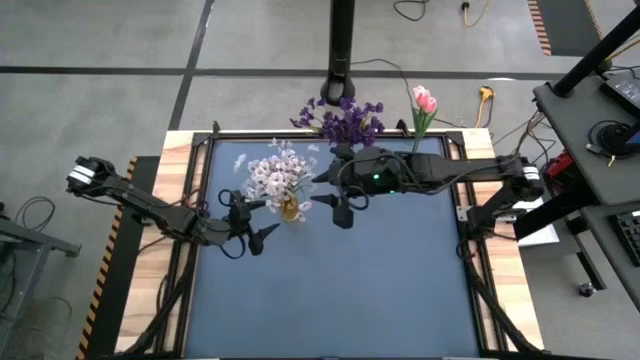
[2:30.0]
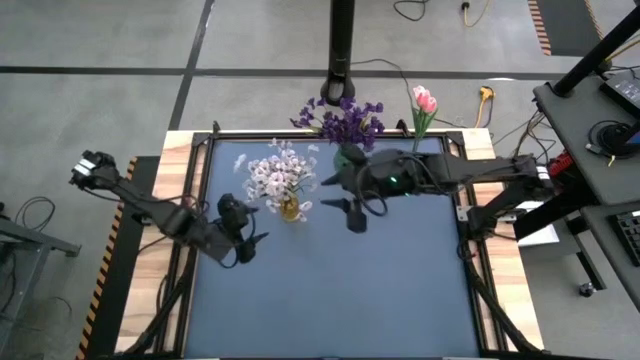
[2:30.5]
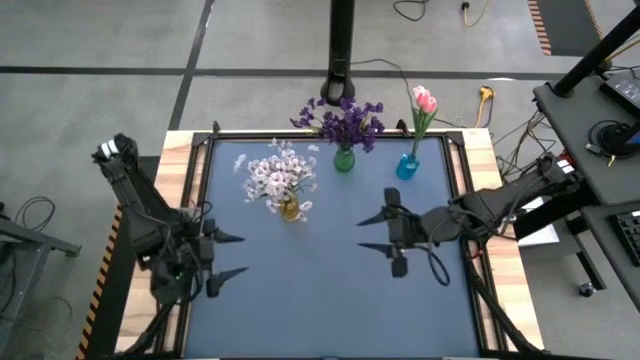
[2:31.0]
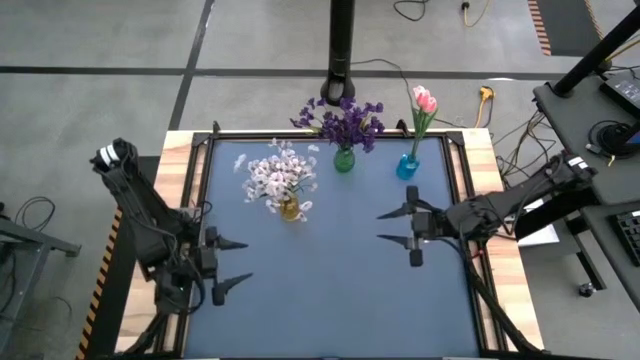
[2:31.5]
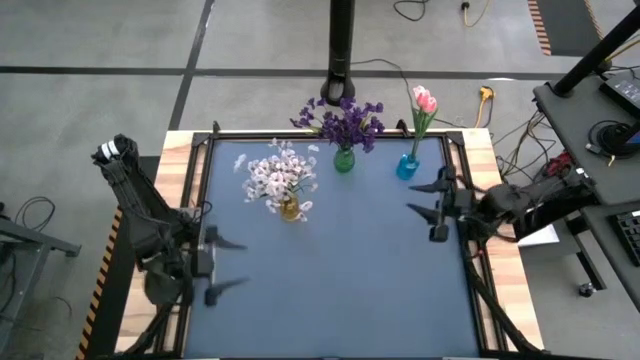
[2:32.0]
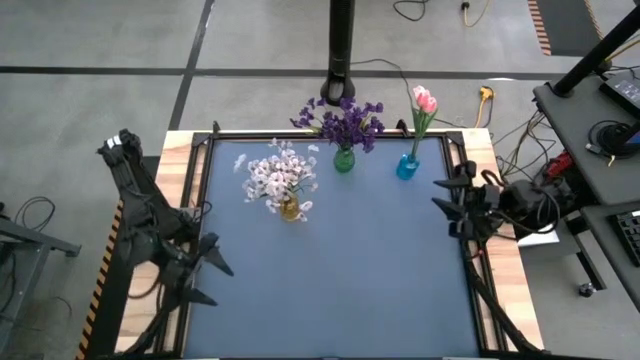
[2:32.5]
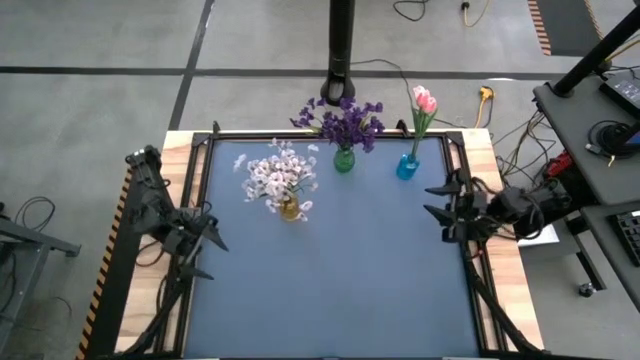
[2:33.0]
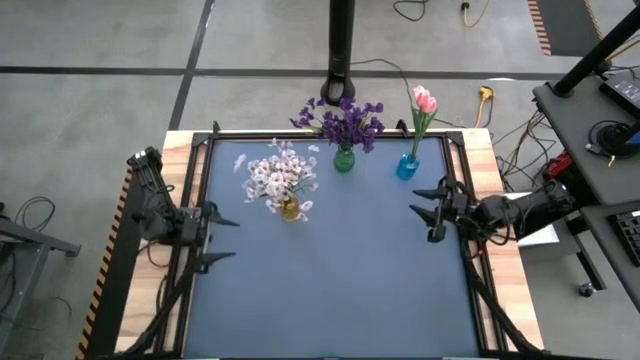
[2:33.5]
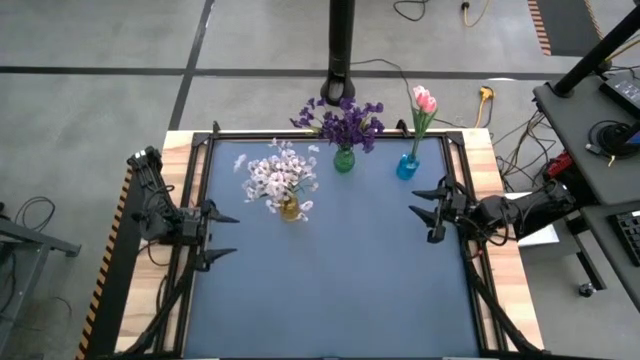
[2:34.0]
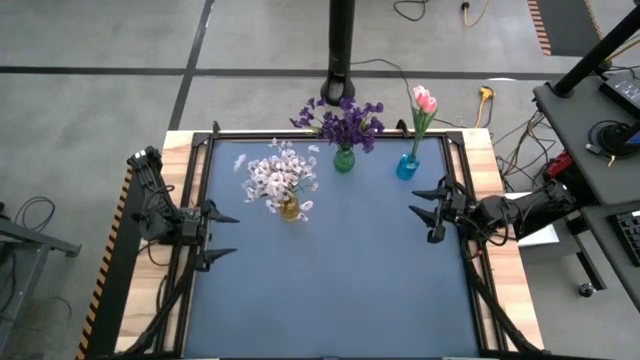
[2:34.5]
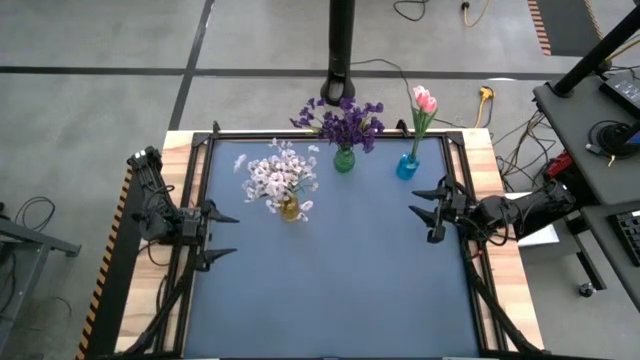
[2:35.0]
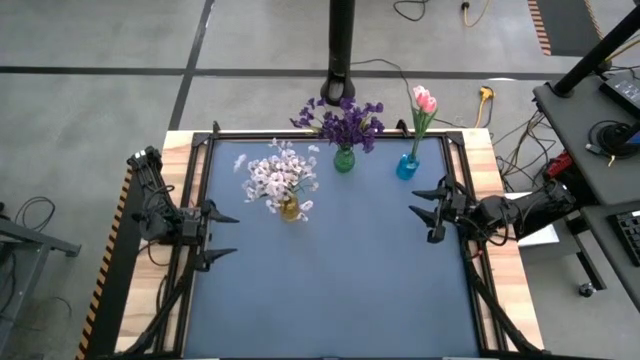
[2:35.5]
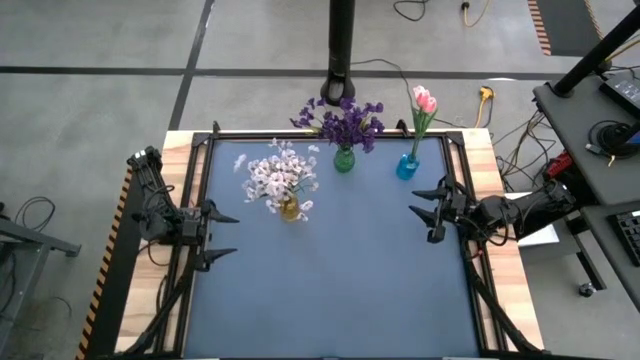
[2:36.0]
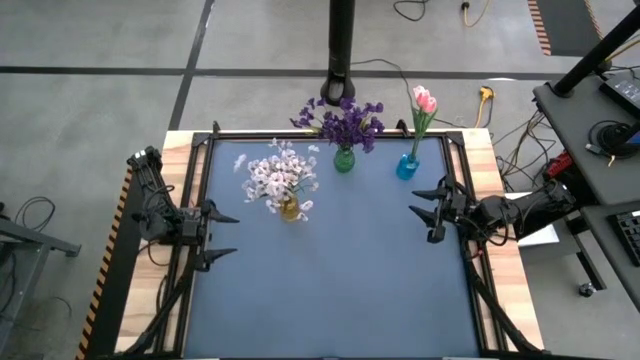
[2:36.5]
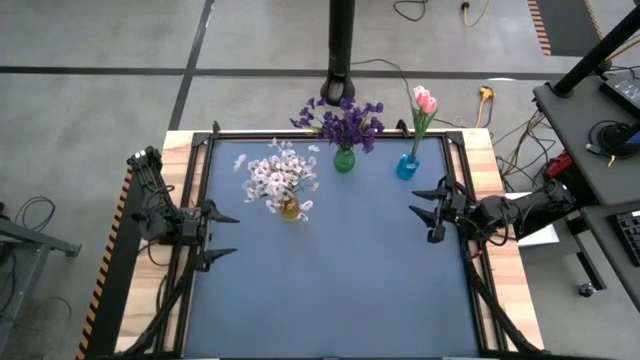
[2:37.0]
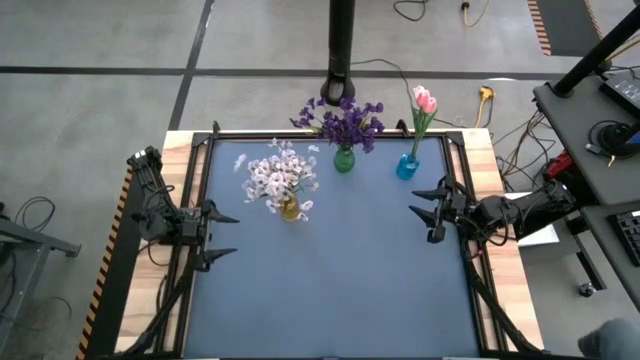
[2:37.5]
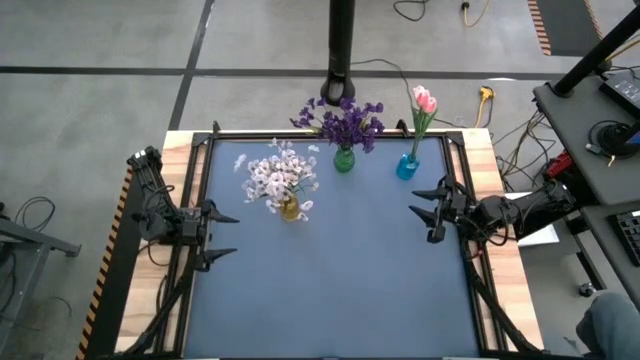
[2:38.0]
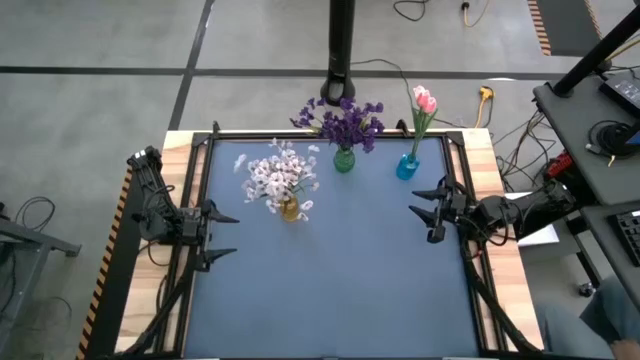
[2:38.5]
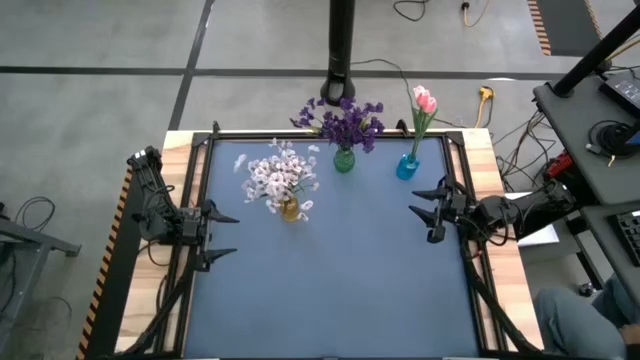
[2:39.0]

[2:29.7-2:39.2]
Task: Sort flowers into vase by color
Return to Home Position

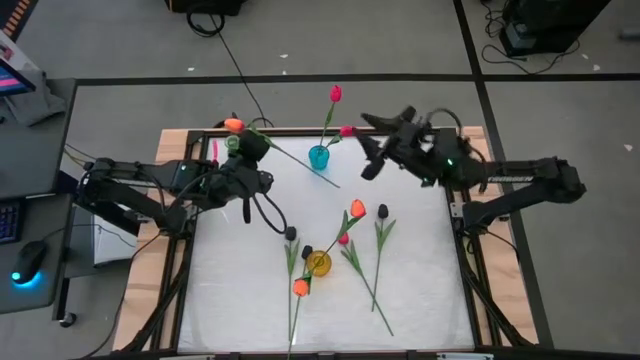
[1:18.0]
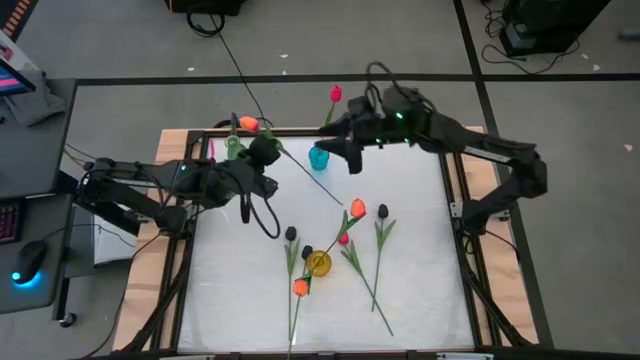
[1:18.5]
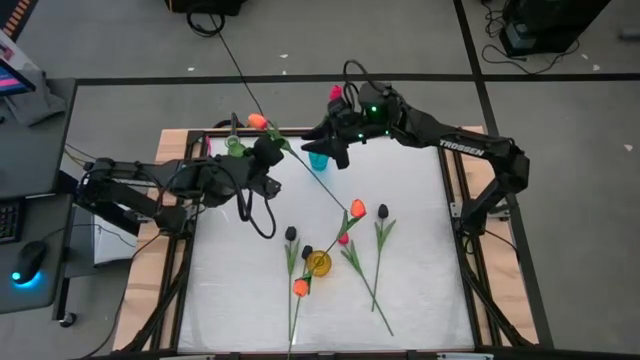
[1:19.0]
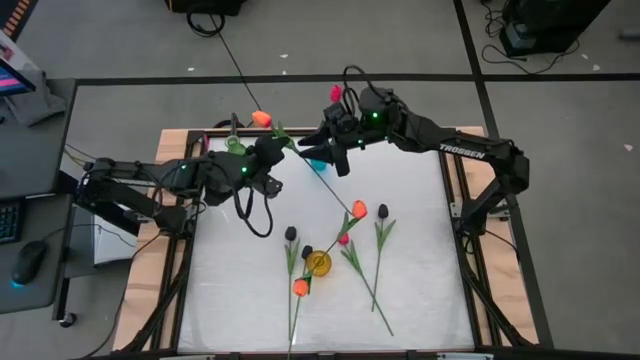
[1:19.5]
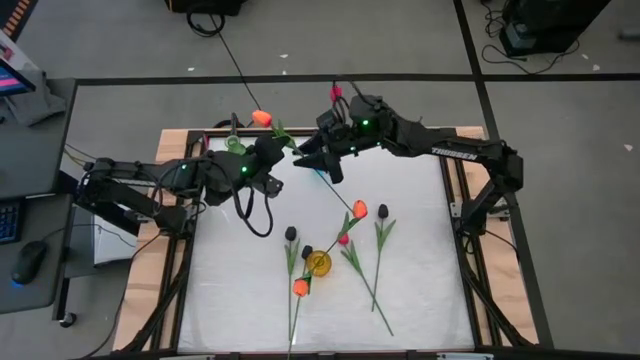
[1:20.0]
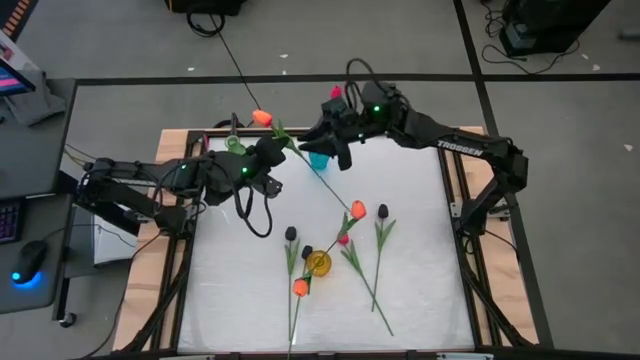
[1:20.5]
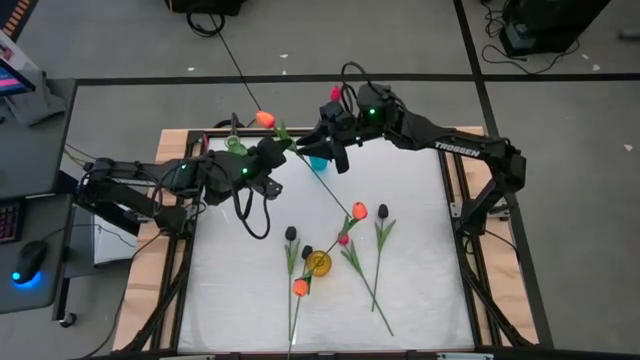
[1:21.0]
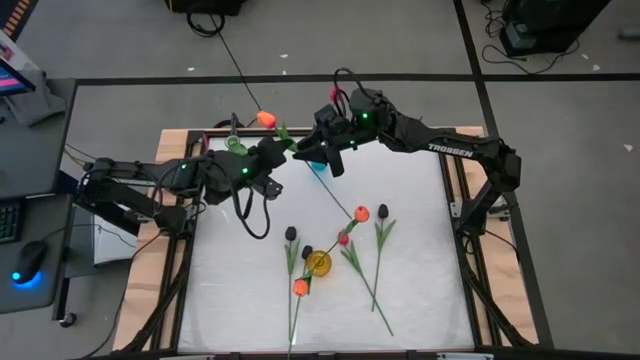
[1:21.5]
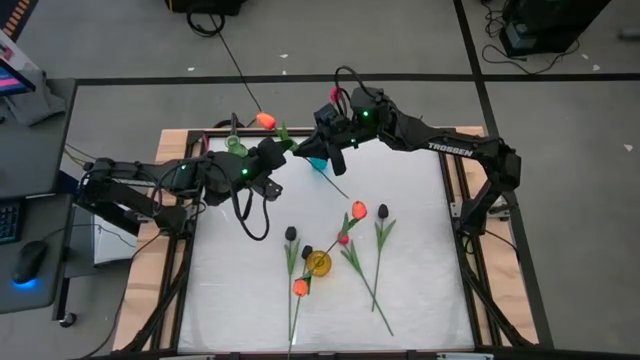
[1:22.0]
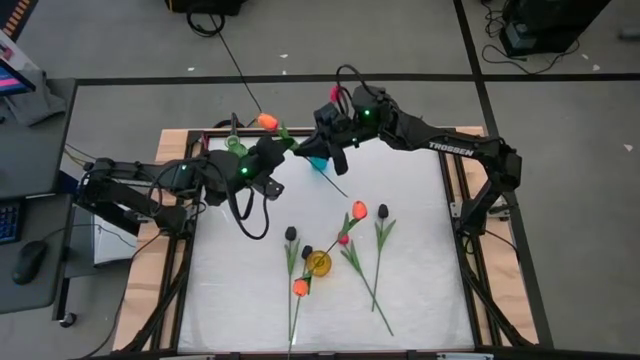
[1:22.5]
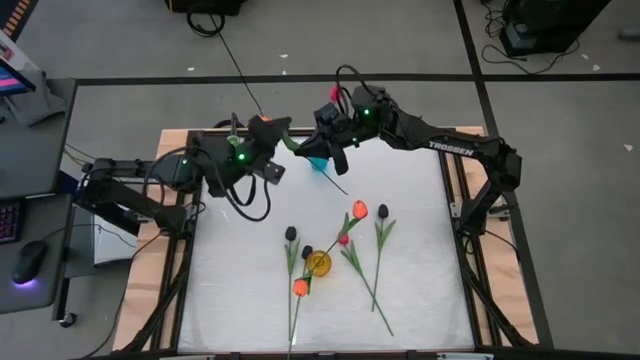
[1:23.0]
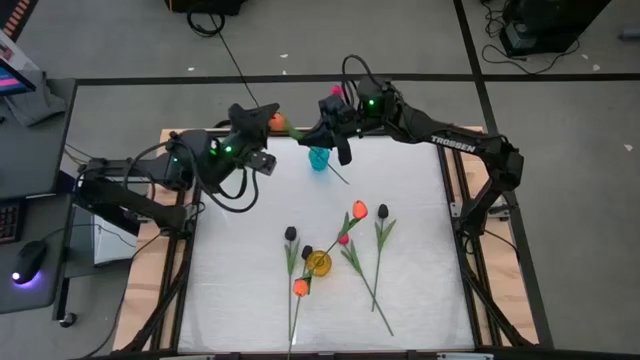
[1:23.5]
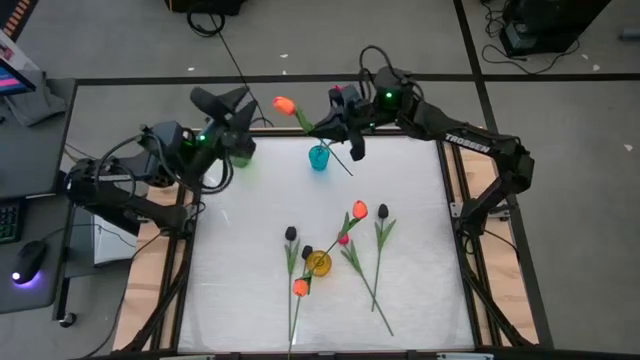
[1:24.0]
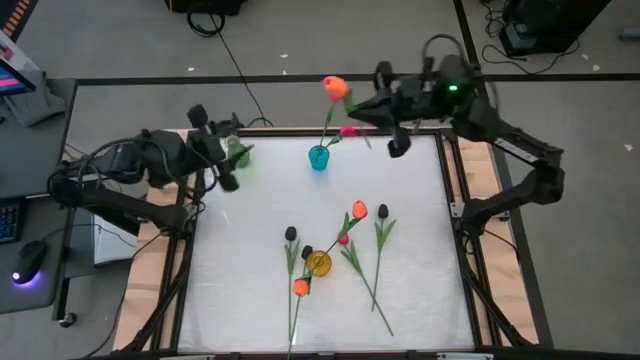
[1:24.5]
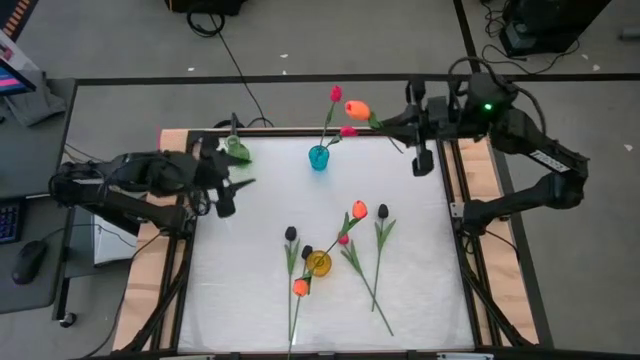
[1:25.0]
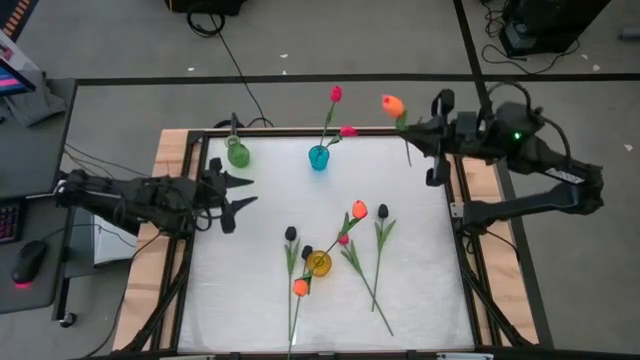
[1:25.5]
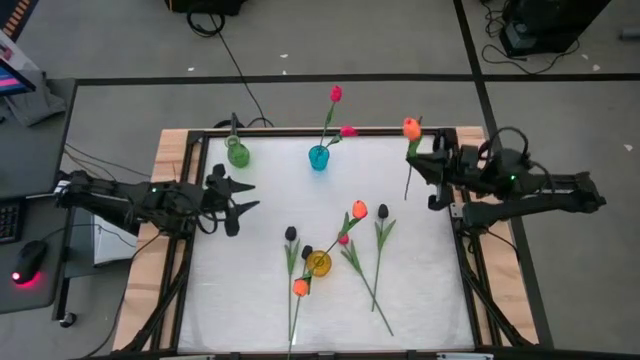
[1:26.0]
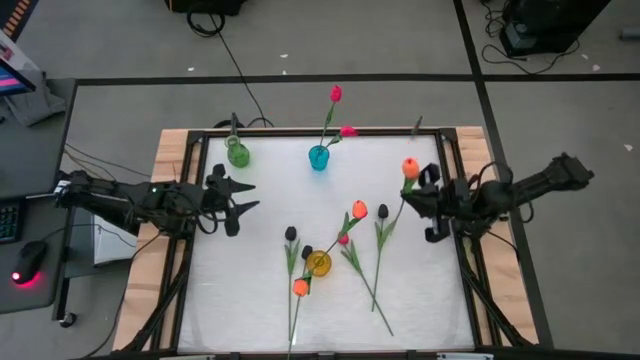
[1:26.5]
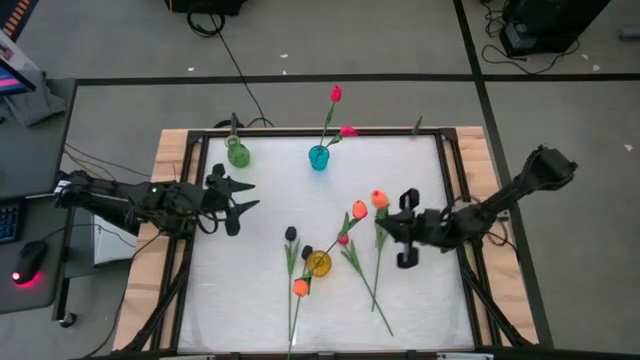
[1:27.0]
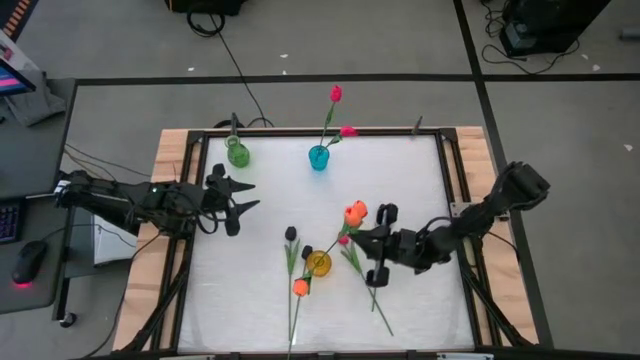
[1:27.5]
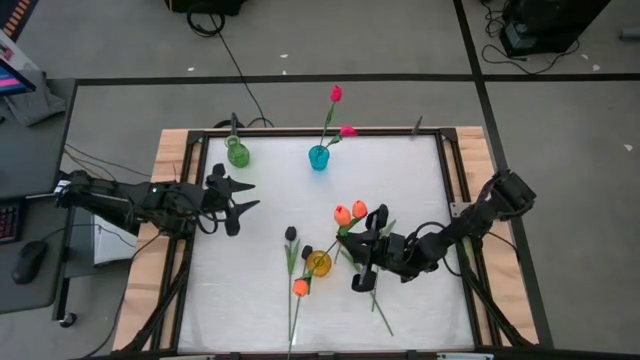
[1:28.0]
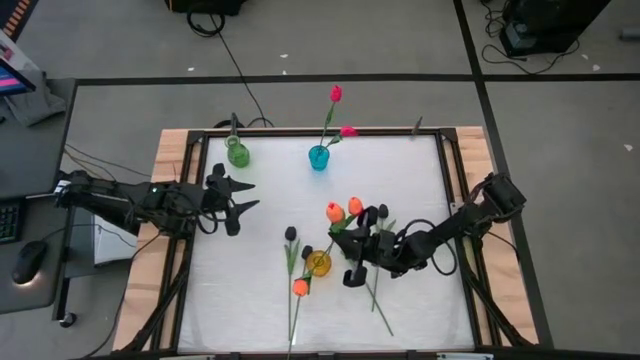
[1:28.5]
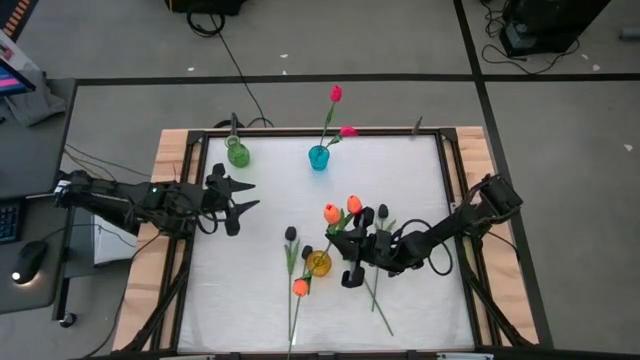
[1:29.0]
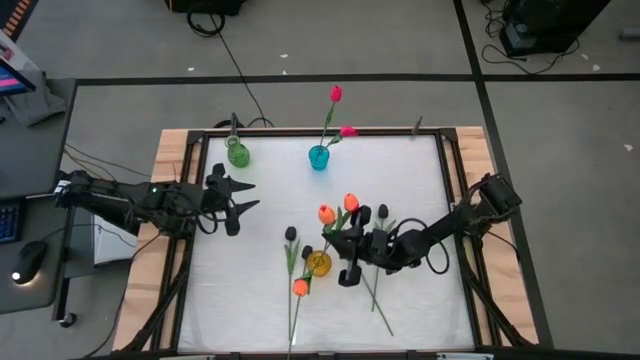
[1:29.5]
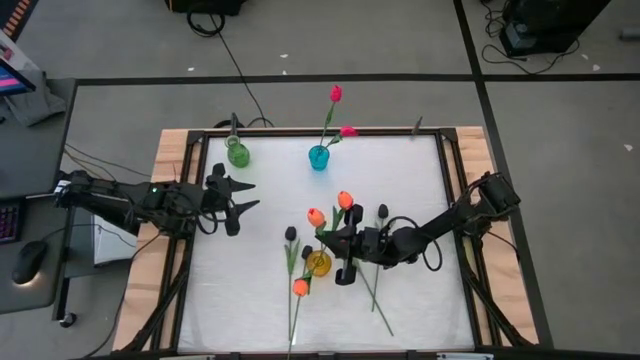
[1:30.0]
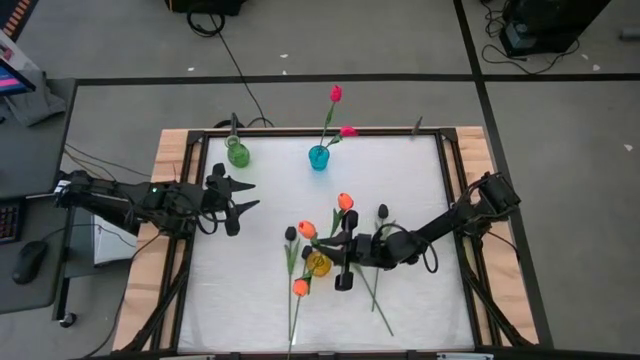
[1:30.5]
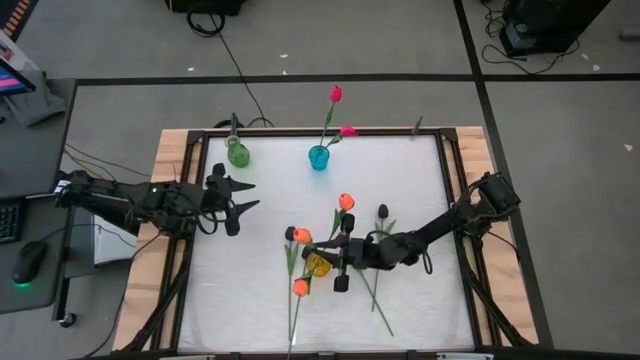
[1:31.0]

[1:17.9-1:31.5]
Task: Sort flowers into vase by color
Put the orange flower into the yellow vase
